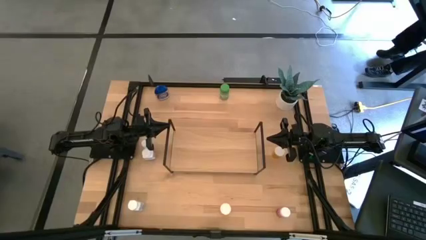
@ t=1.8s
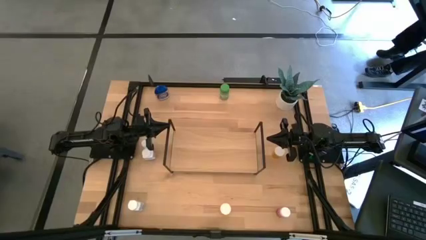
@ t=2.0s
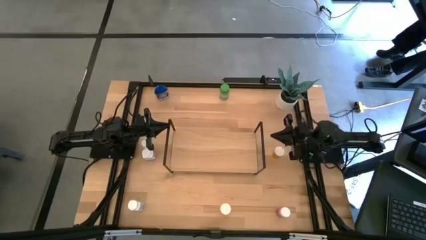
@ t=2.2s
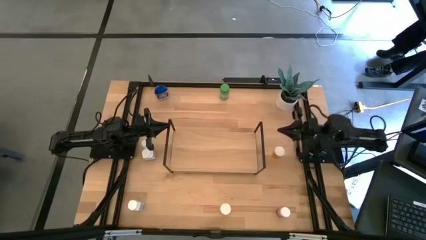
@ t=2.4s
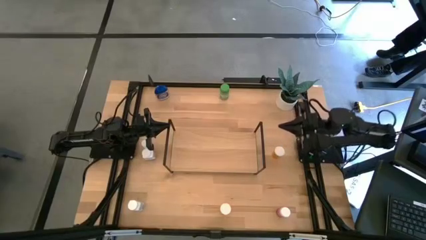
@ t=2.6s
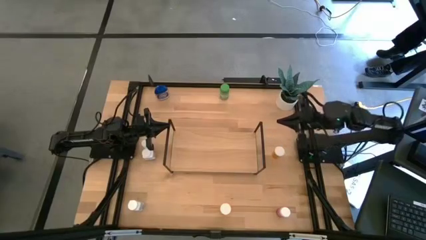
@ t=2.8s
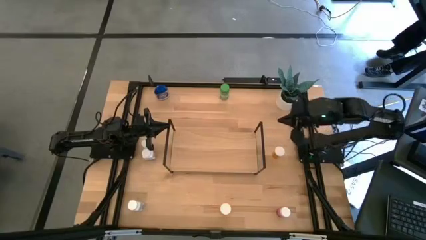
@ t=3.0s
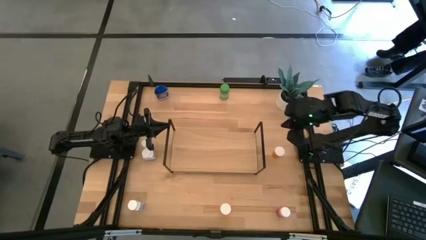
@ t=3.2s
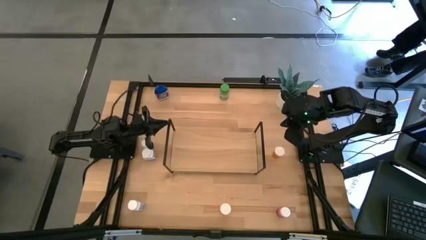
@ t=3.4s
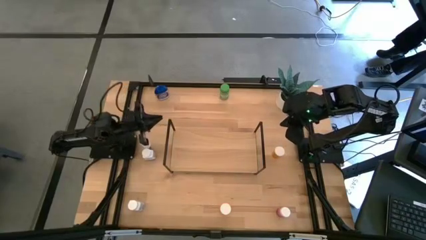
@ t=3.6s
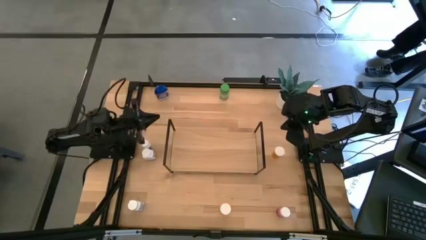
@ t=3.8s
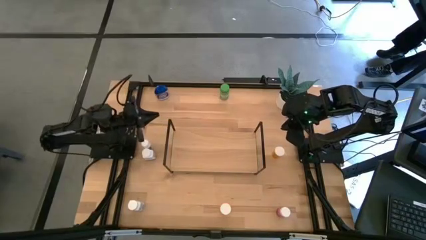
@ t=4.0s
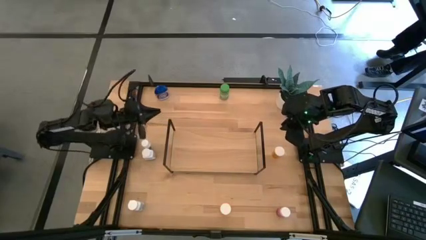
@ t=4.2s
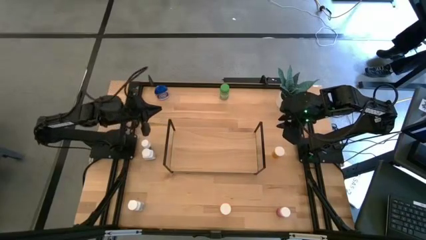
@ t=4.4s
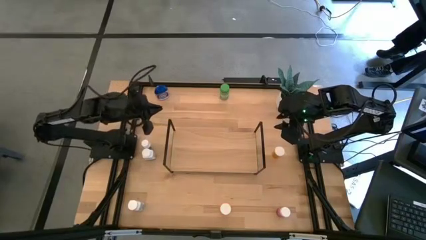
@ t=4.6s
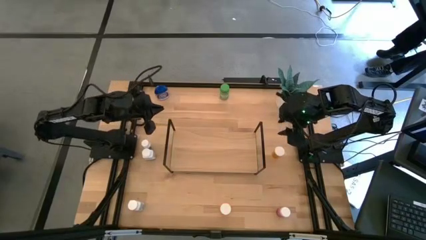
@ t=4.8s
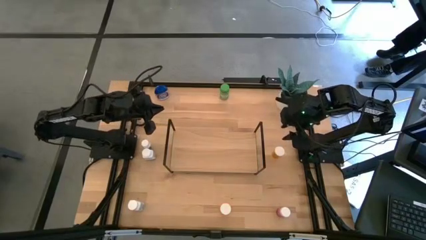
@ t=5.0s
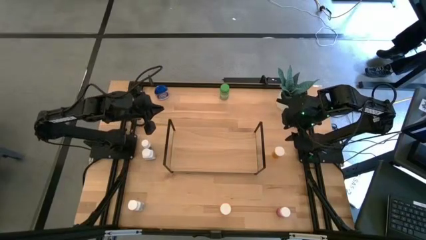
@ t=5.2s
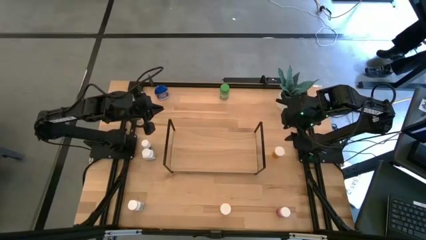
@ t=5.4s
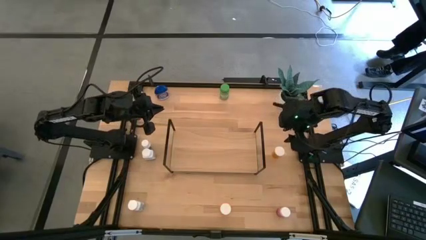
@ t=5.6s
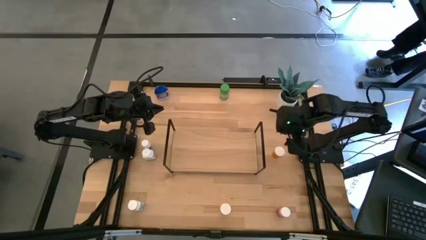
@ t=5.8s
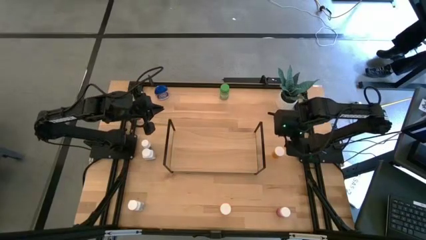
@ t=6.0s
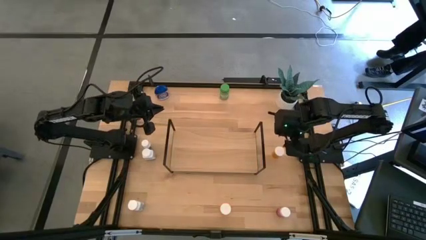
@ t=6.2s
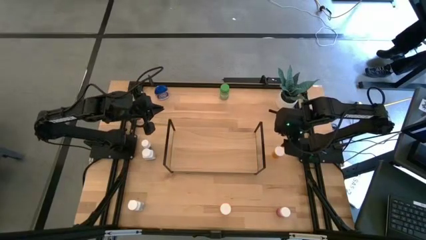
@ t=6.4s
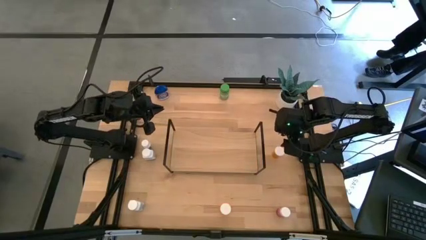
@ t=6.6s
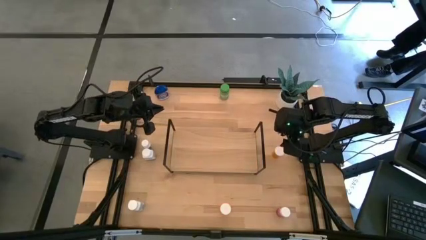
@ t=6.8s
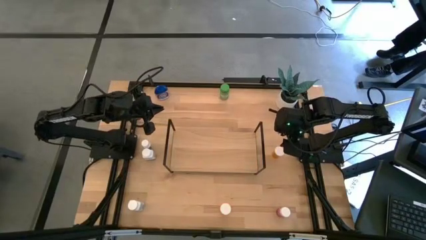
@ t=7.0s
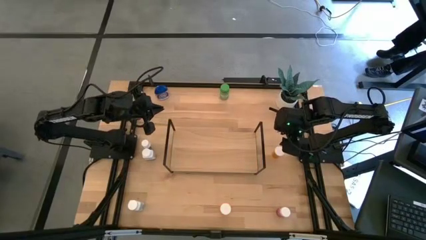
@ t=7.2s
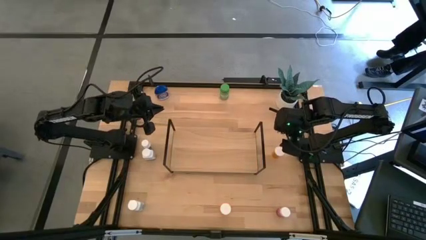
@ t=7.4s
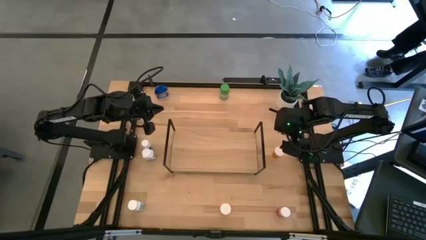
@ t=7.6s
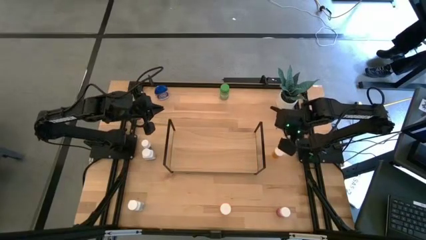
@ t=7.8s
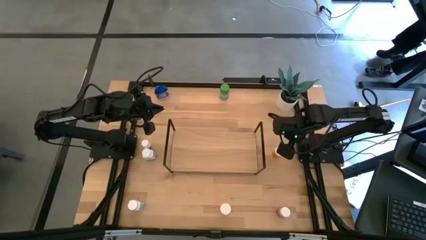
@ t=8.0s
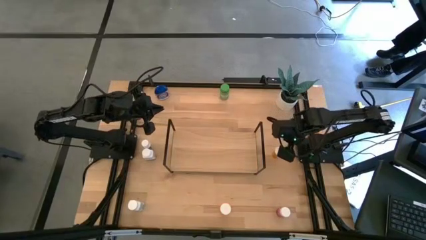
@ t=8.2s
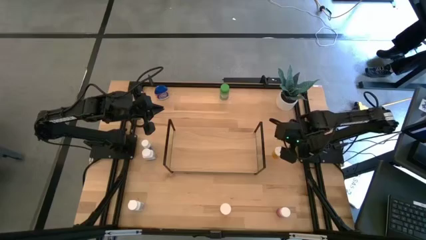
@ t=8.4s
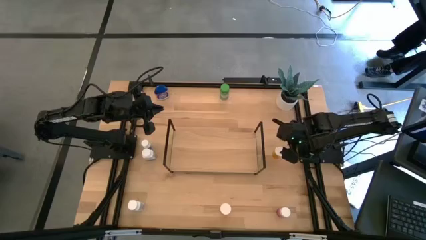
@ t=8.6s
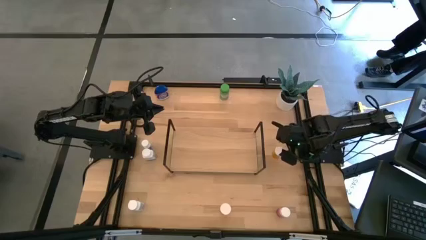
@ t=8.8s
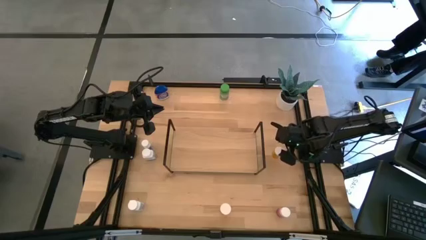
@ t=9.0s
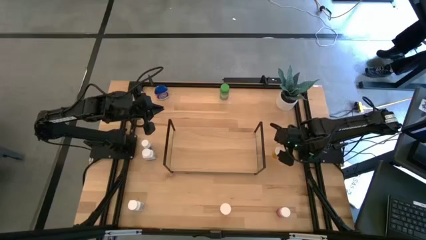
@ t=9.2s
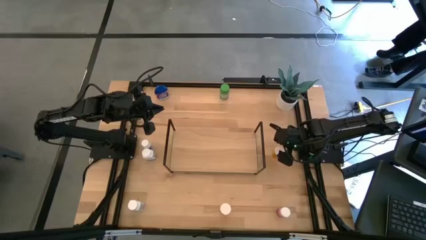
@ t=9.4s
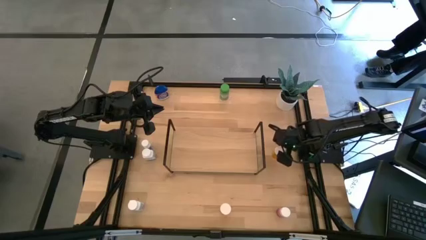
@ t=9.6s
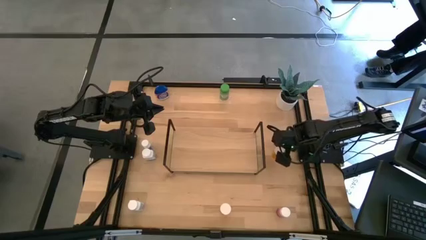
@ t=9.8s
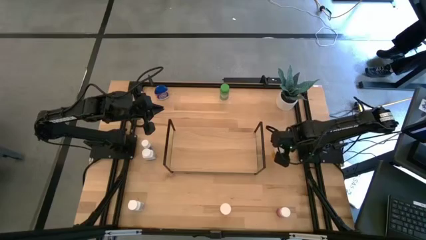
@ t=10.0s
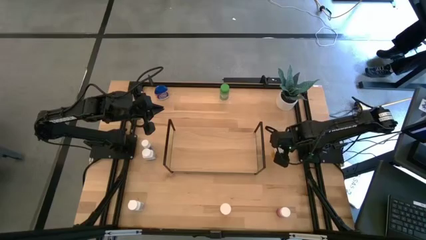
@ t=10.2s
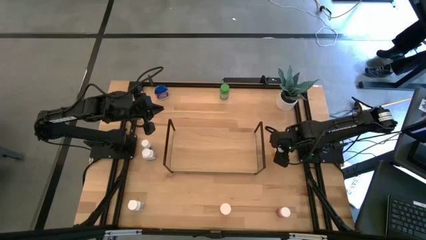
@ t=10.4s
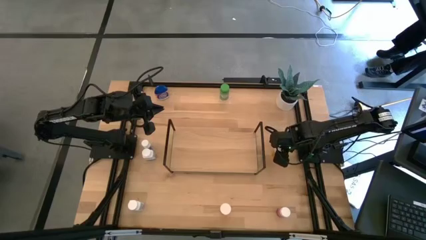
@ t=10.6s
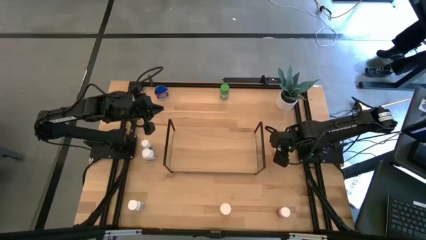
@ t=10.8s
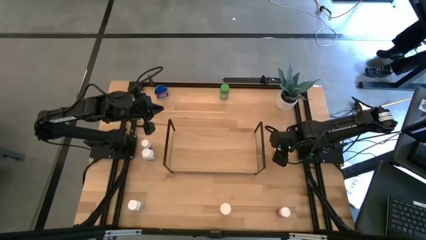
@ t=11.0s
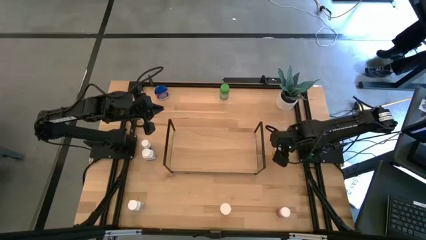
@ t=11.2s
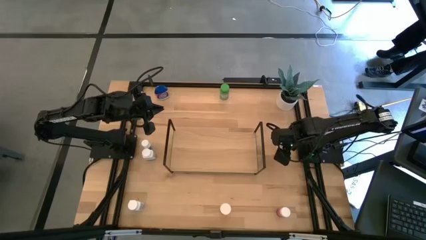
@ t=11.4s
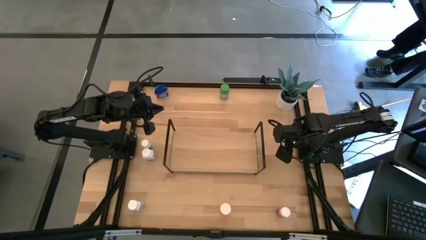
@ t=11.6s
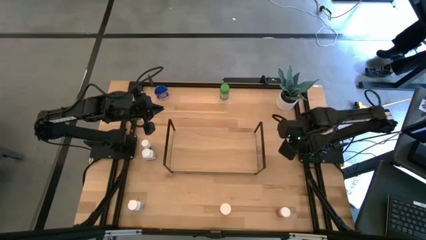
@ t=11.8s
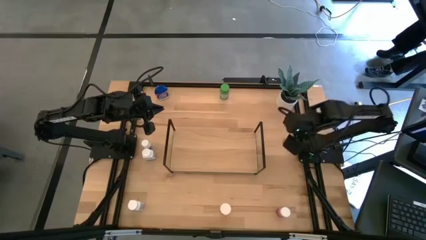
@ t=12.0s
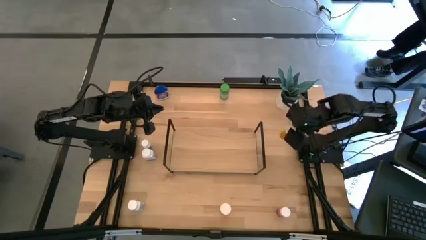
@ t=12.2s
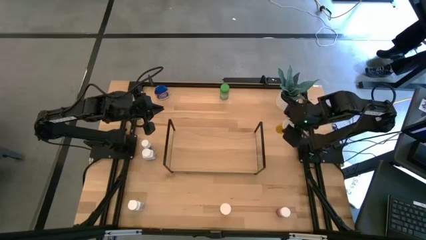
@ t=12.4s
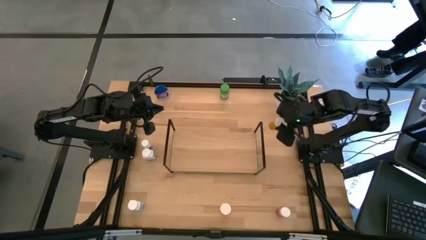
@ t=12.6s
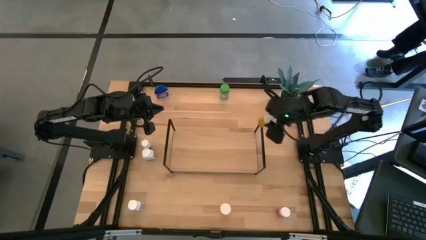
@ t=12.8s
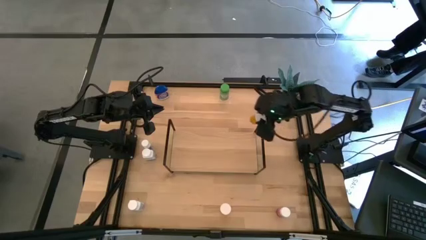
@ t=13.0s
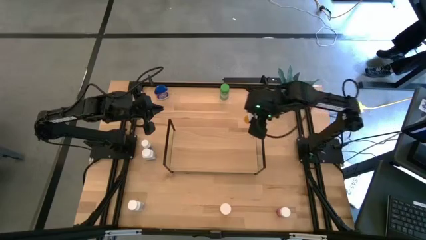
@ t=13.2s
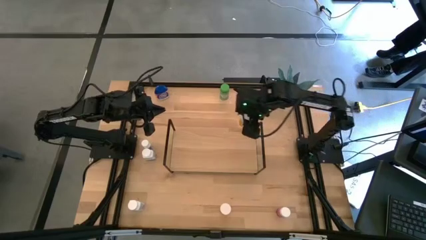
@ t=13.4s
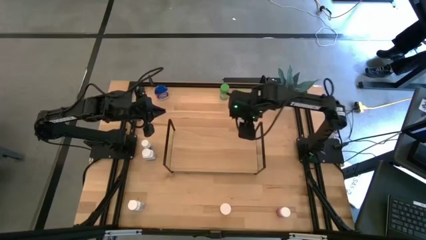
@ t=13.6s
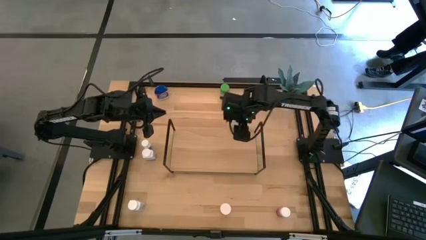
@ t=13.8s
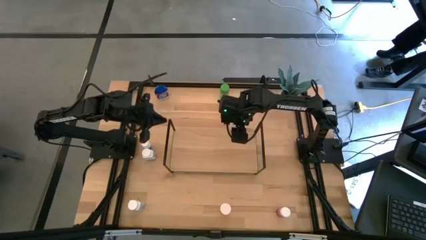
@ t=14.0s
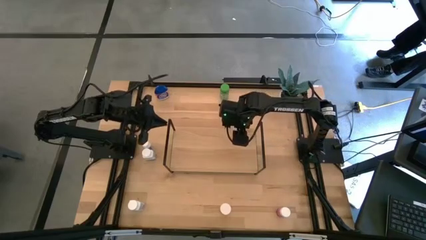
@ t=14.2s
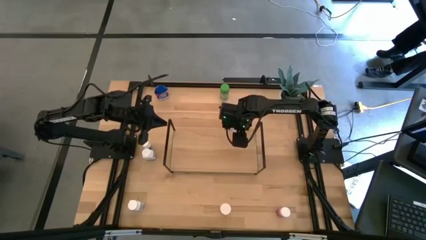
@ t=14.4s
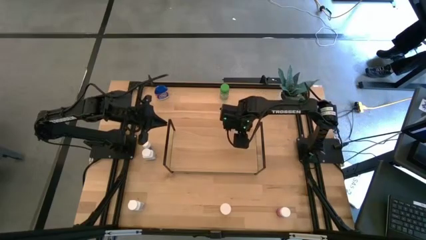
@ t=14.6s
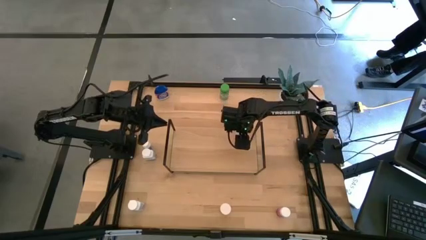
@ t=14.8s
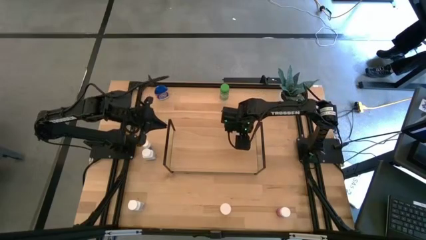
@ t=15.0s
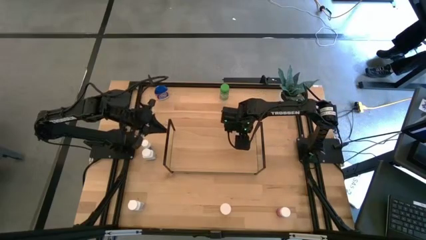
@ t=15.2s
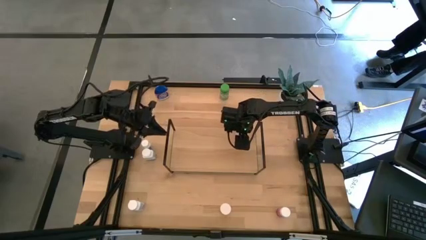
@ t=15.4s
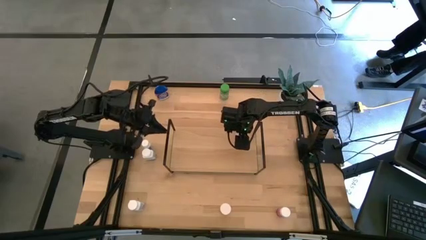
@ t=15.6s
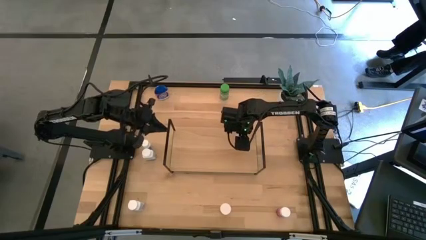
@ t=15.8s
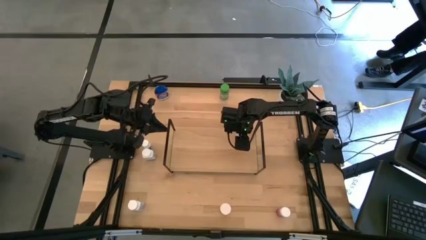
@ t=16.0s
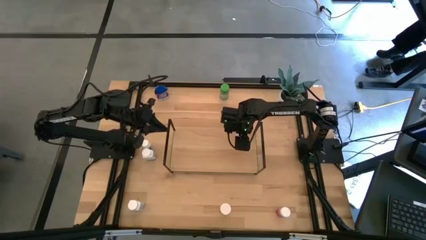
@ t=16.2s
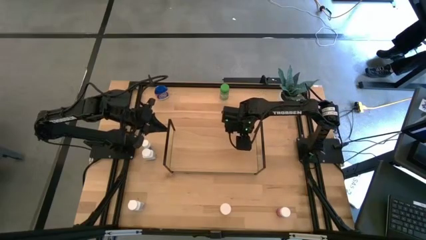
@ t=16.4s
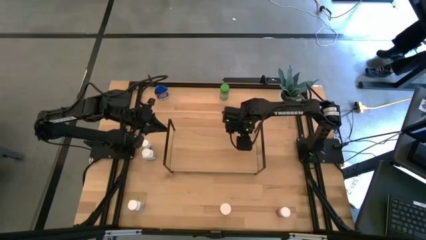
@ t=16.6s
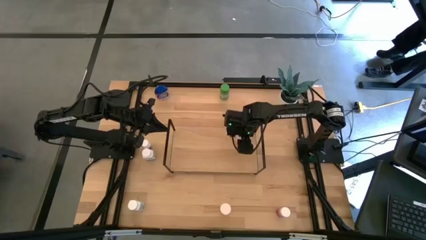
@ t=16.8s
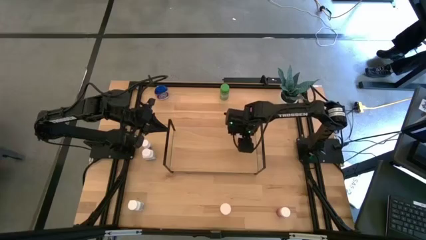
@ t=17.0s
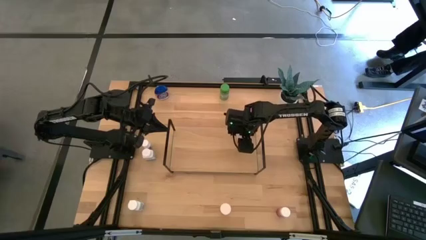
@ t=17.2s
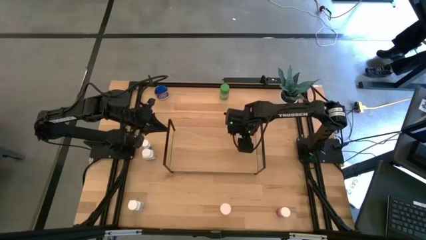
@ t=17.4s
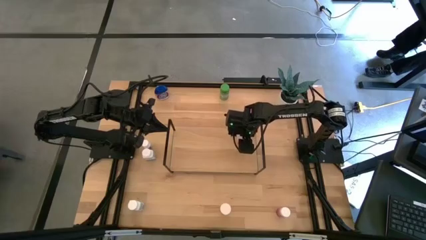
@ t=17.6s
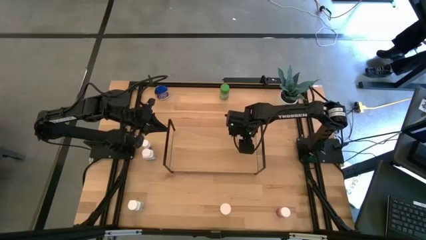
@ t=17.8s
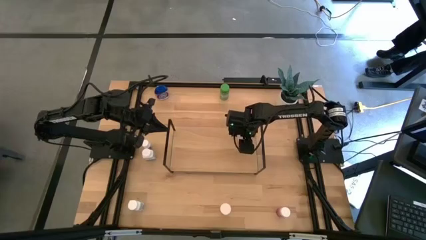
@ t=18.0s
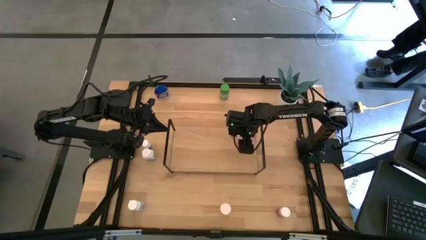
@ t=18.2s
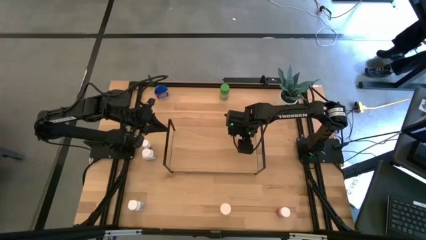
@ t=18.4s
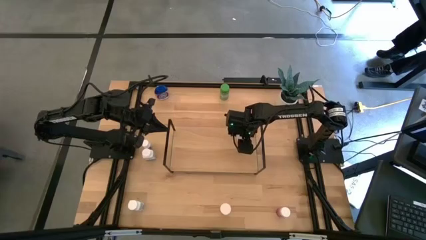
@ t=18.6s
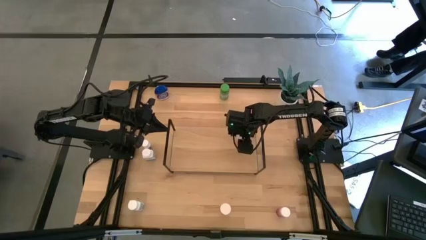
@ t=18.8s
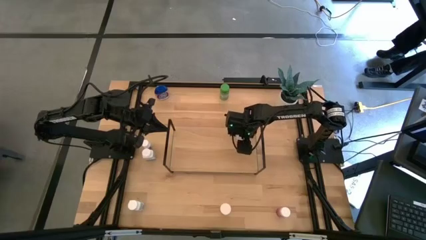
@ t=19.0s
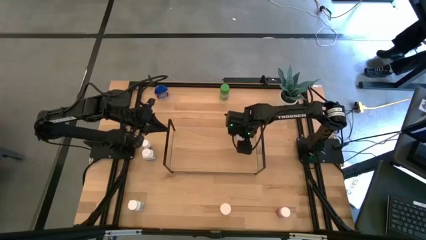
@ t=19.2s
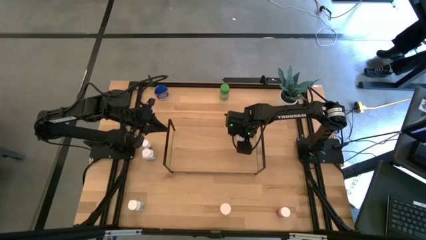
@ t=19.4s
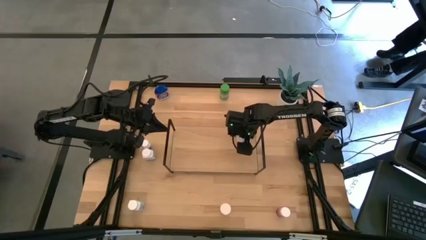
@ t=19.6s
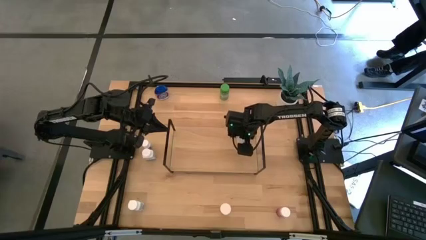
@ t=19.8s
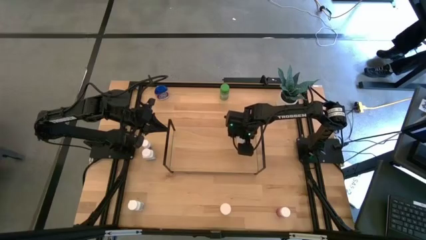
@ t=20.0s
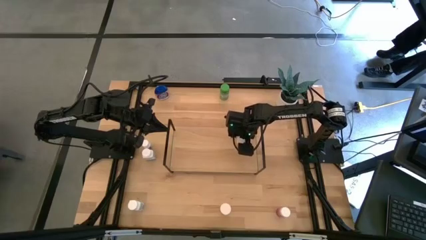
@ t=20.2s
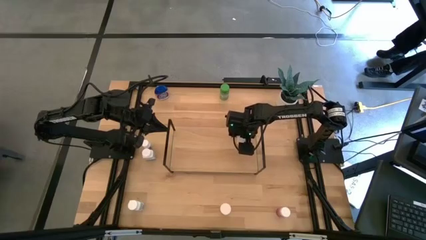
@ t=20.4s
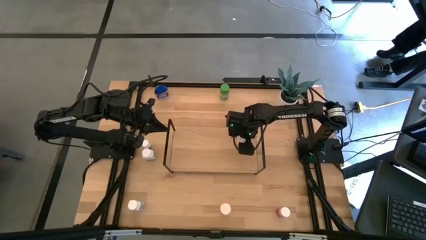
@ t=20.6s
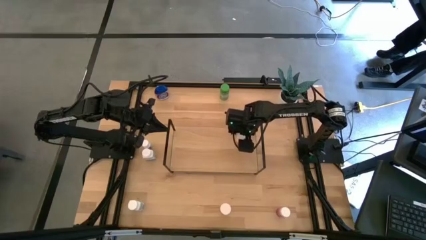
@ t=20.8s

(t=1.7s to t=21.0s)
Task: Pick and place medicine bottles onto shelf by color
Put the top orange pill bottle on the shelf
